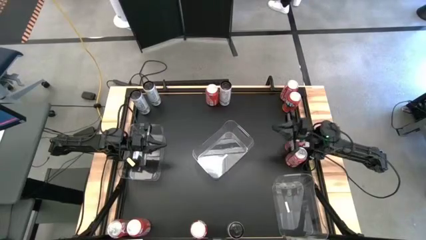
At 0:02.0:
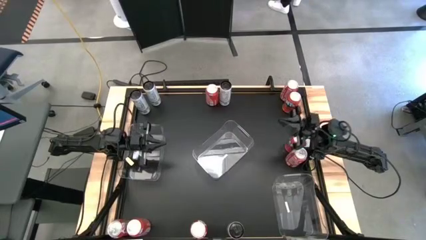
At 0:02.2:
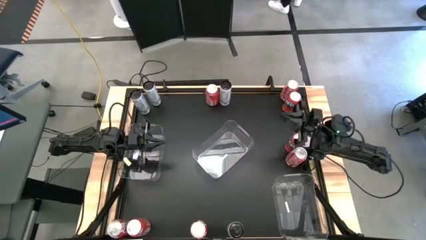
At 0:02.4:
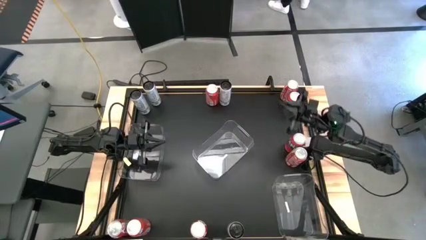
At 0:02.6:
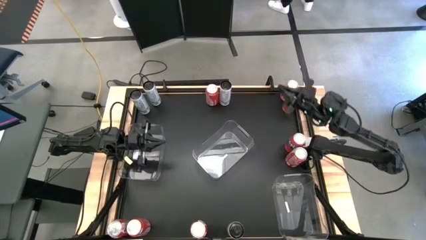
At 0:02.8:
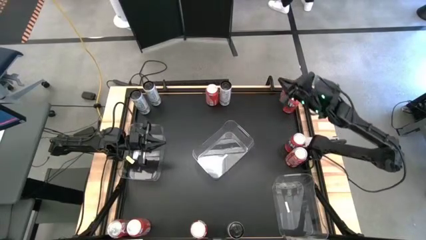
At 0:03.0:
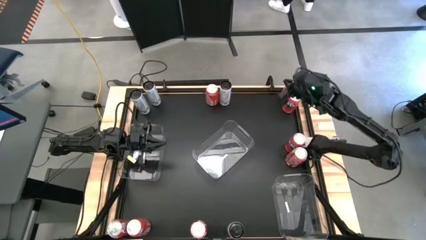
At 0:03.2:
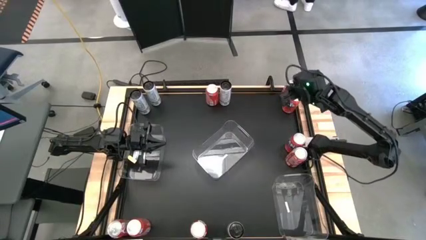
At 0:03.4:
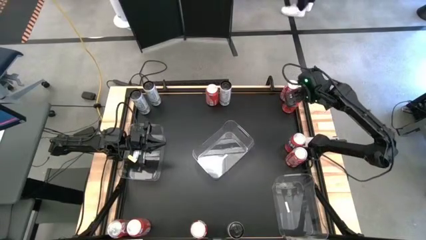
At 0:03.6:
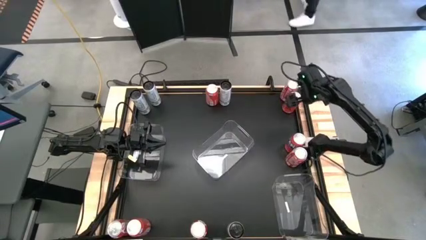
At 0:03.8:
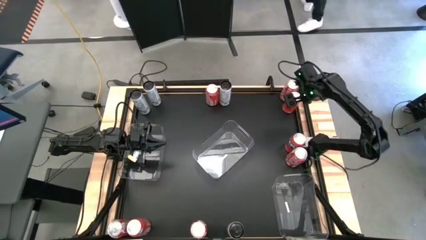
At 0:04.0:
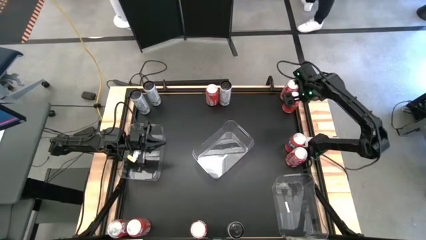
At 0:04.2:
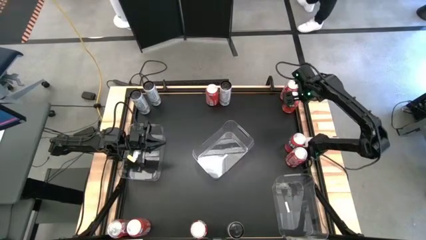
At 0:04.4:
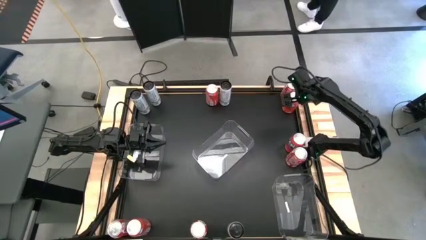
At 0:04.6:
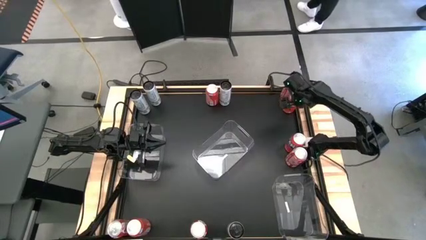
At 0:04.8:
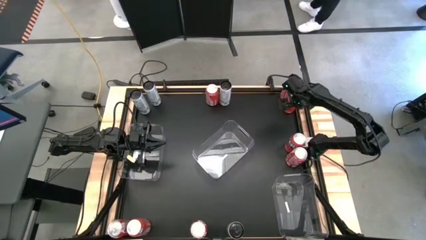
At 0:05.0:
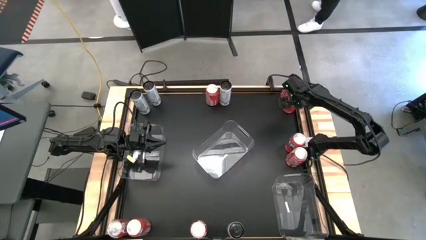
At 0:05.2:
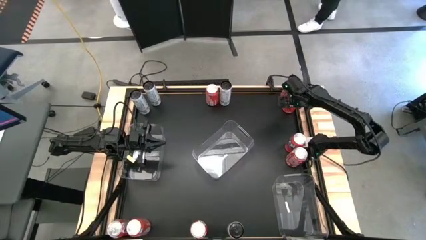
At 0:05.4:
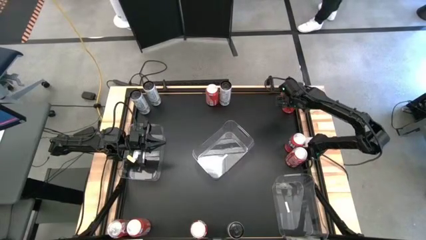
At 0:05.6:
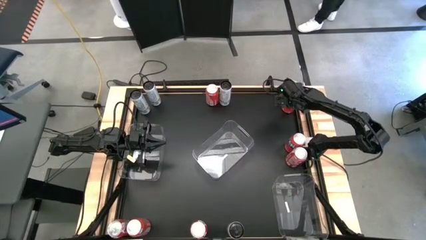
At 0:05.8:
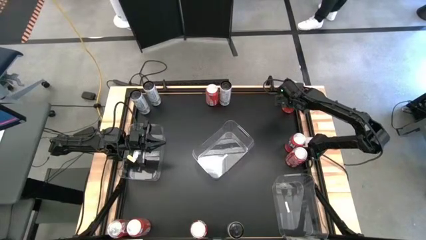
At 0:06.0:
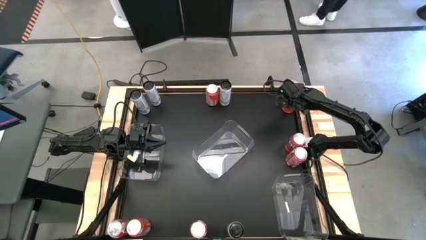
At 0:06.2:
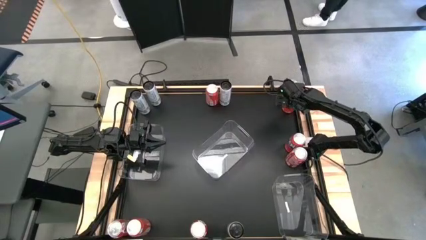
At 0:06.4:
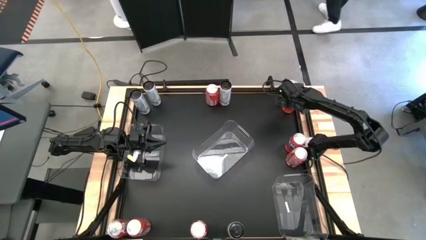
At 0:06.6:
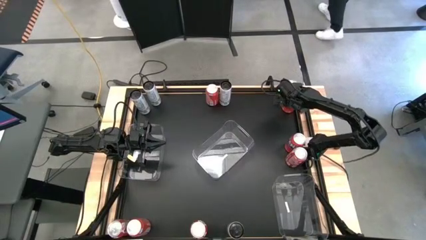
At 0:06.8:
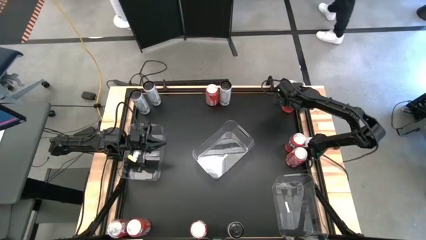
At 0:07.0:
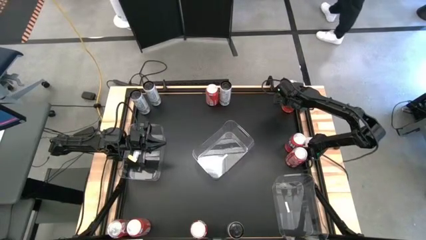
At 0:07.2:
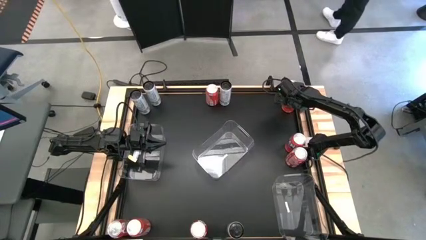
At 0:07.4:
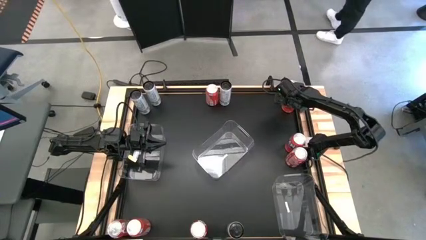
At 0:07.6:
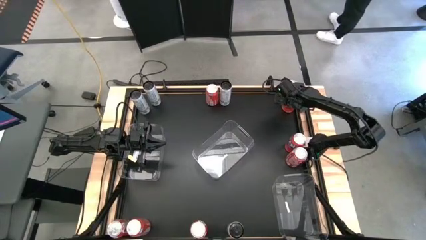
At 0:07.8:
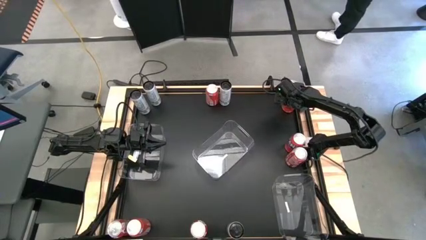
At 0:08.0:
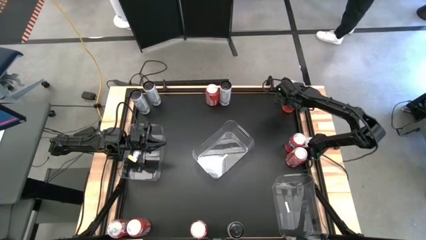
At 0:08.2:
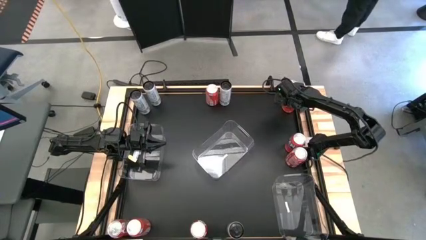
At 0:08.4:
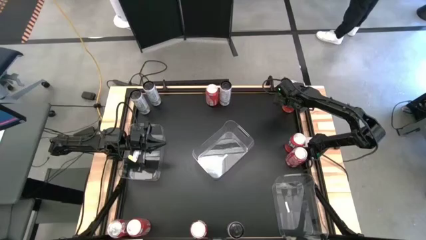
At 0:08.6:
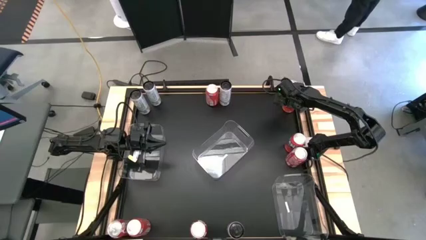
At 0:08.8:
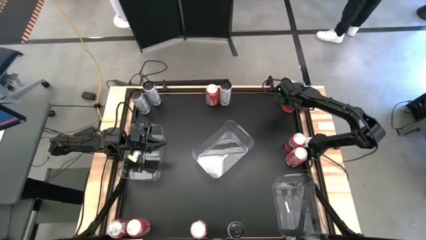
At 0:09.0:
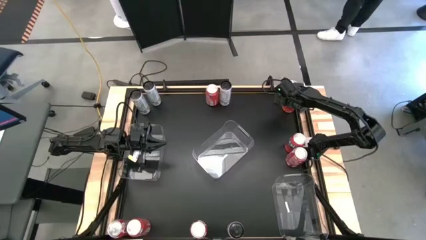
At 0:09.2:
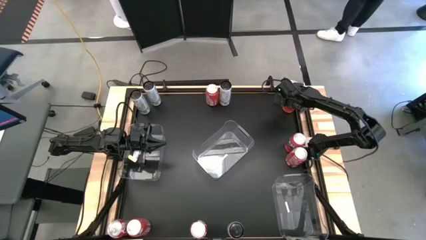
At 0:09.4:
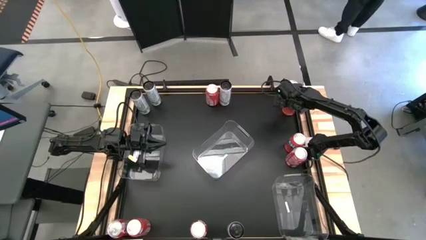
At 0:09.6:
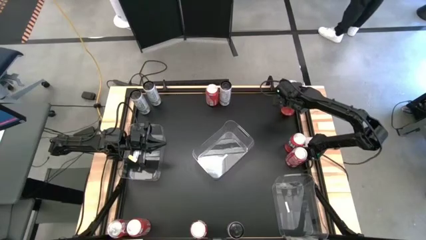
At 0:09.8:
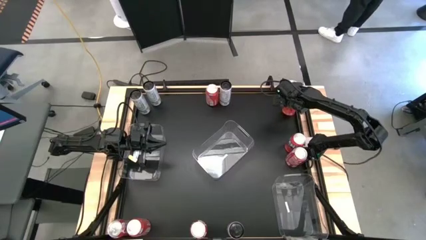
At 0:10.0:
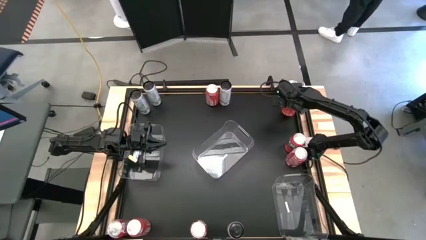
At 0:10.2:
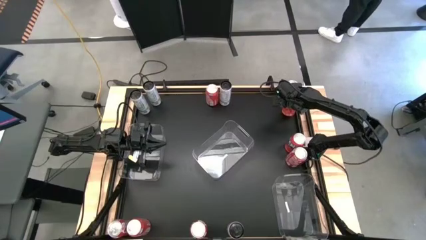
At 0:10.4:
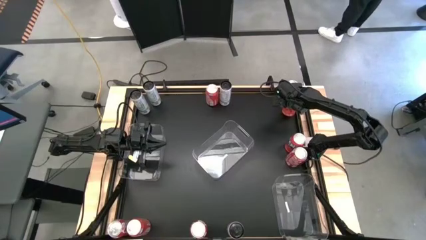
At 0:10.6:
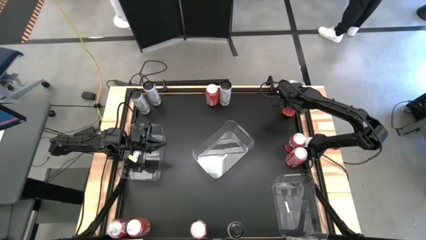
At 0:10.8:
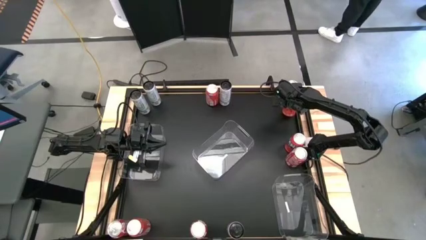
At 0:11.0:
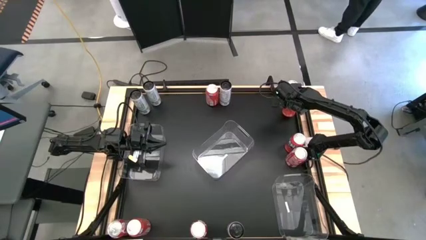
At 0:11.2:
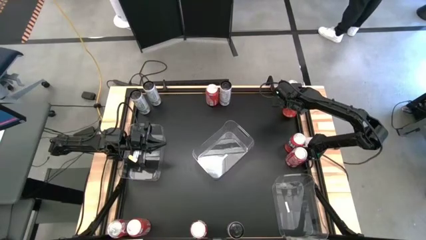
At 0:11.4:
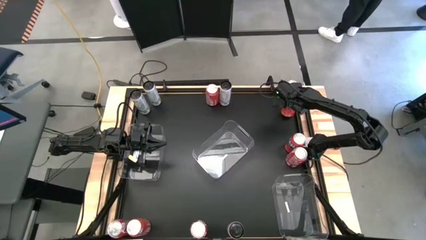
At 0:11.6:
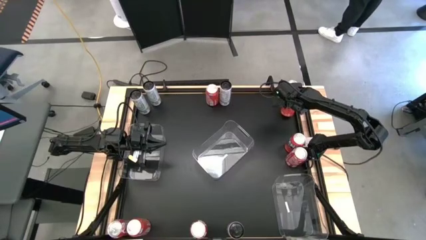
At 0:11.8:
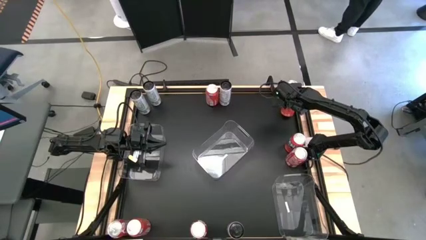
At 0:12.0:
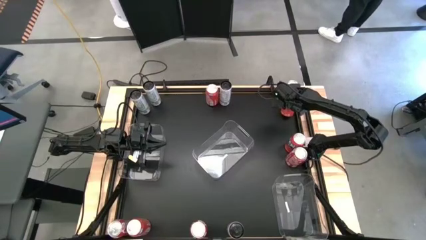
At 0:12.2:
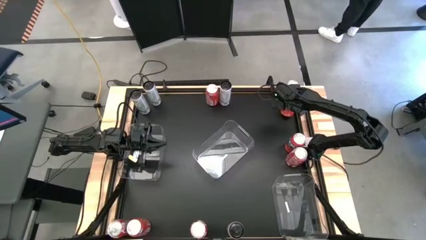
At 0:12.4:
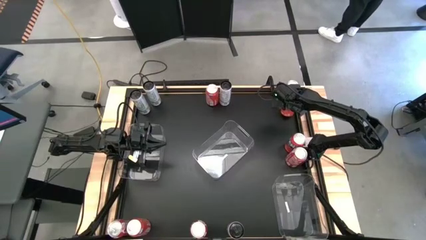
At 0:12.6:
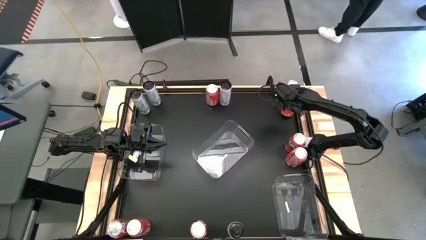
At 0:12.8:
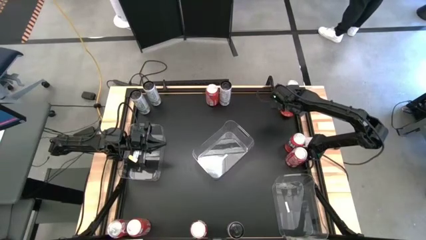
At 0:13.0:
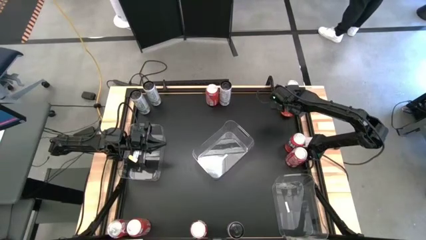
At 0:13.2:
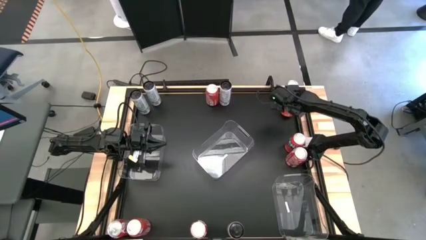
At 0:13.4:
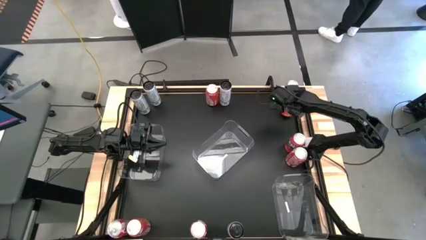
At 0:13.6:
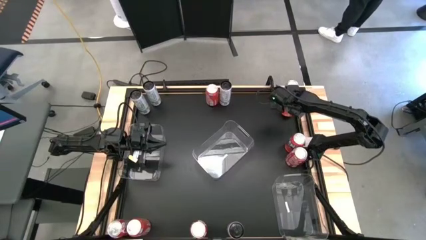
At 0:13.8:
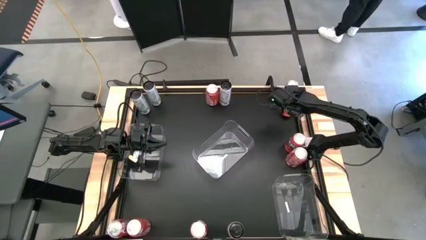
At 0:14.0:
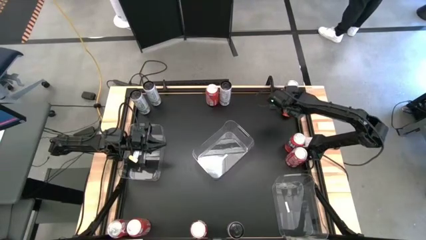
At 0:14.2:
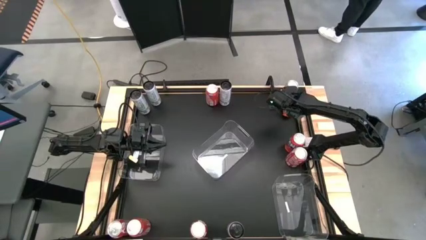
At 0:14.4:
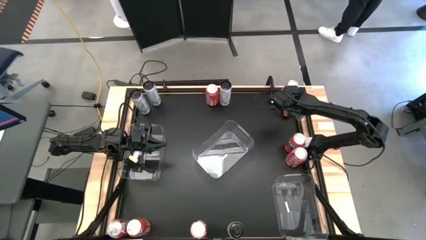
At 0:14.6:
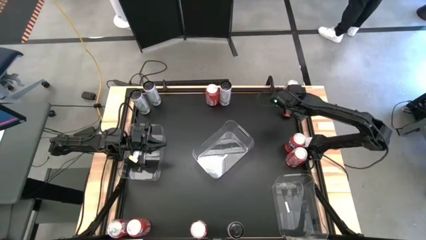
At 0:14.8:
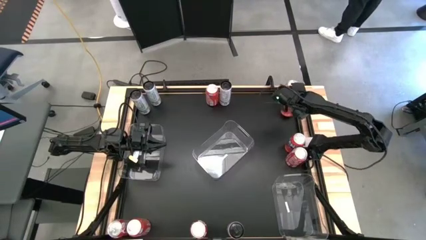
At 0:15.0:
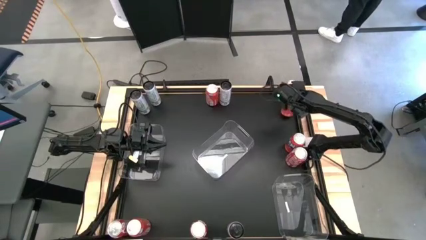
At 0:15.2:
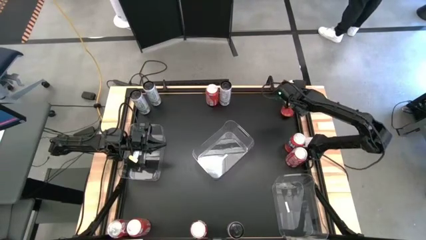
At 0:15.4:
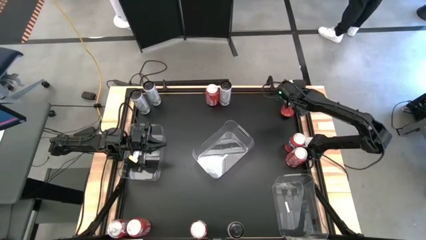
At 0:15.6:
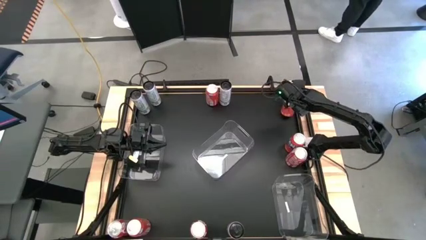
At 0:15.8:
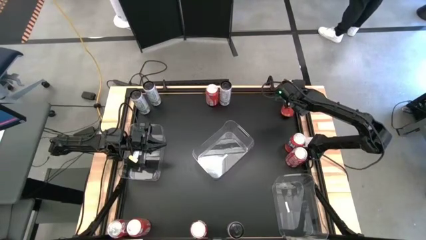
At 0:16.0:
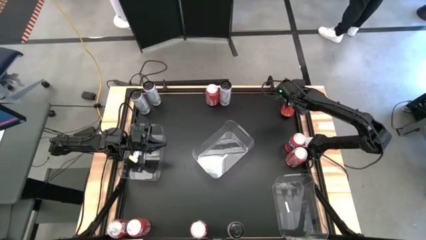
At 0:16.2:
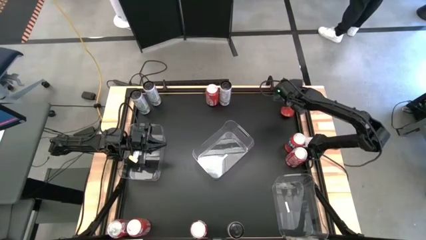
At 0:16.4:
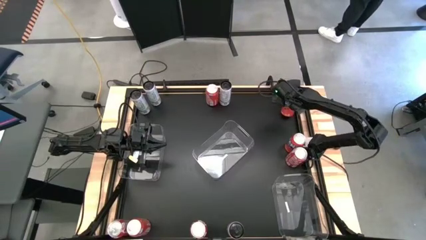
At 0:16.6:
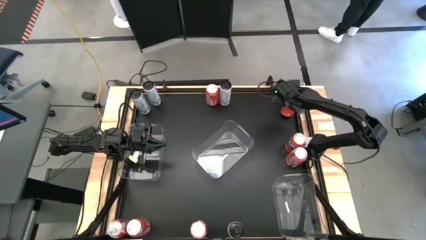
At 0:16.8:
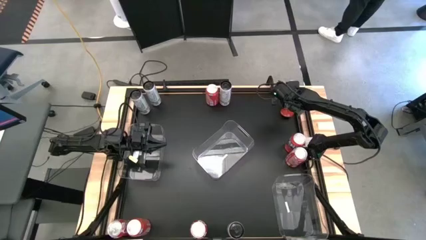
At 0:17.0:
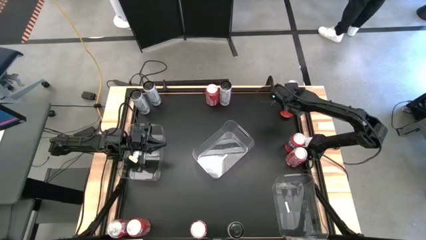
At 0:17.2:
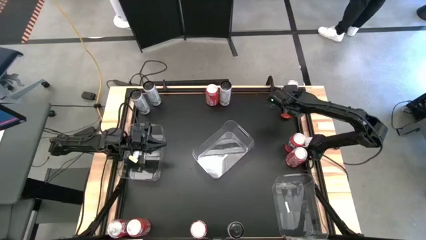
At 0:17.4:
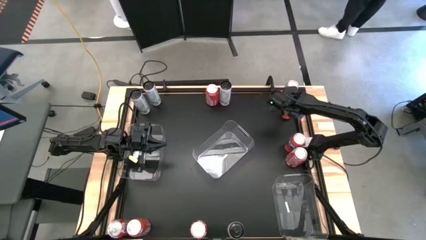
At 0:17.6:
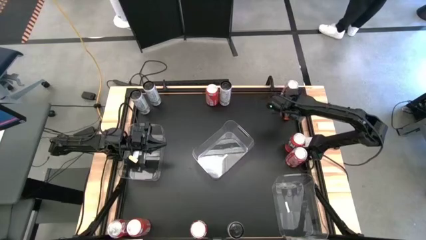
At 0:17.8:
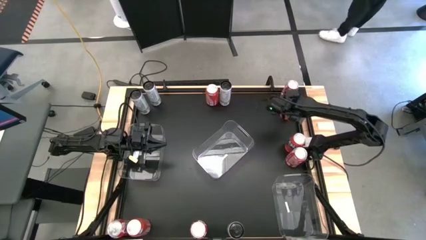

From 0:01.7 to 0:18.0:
Task: Sort soda cans
Adjust the orange soda can
